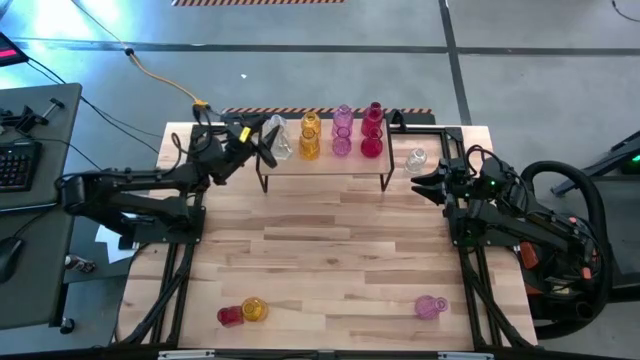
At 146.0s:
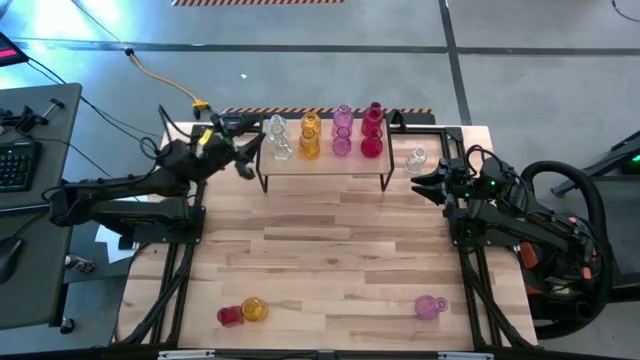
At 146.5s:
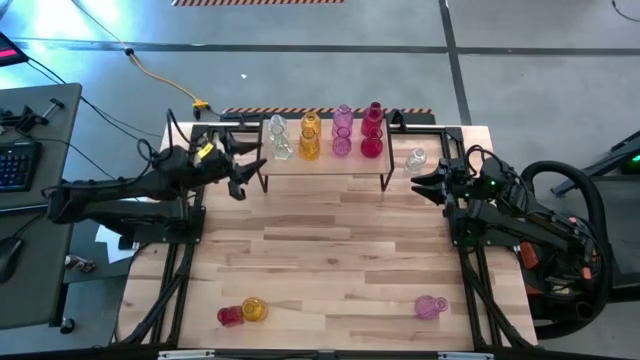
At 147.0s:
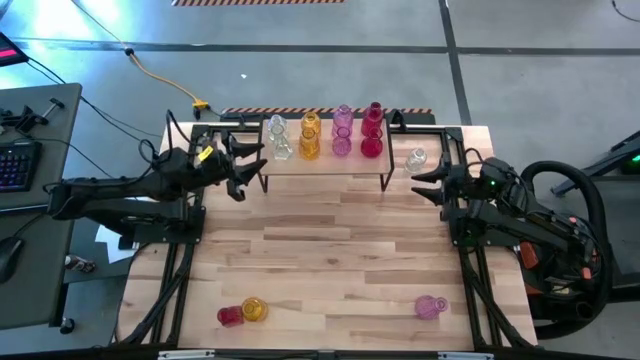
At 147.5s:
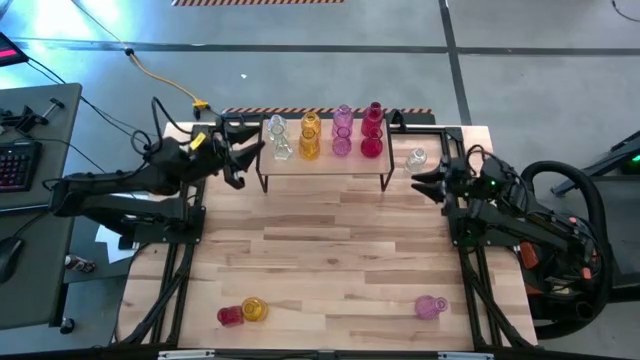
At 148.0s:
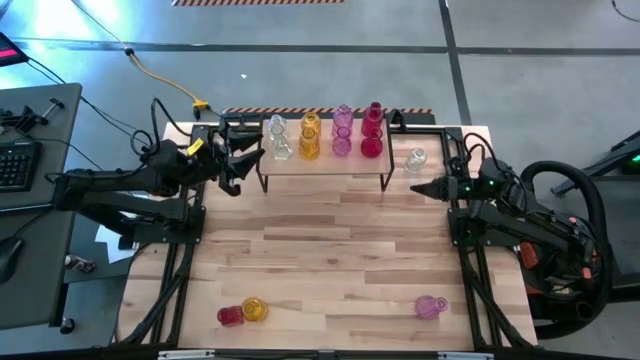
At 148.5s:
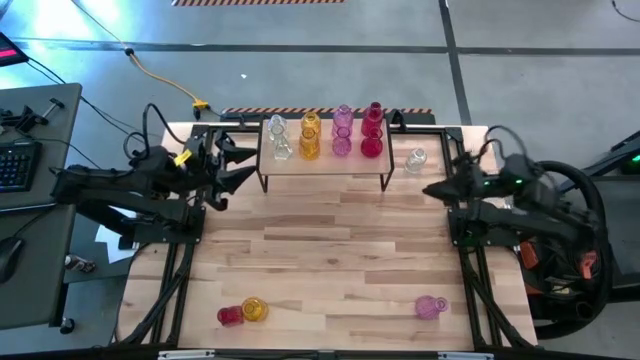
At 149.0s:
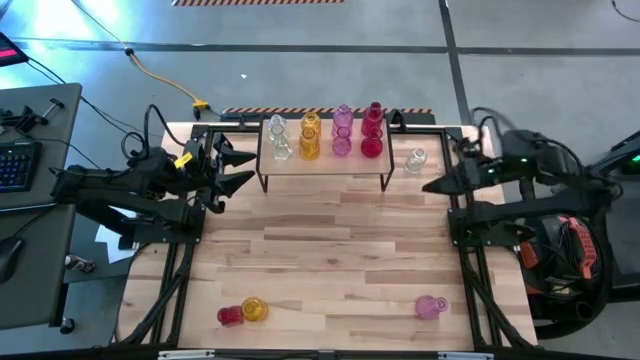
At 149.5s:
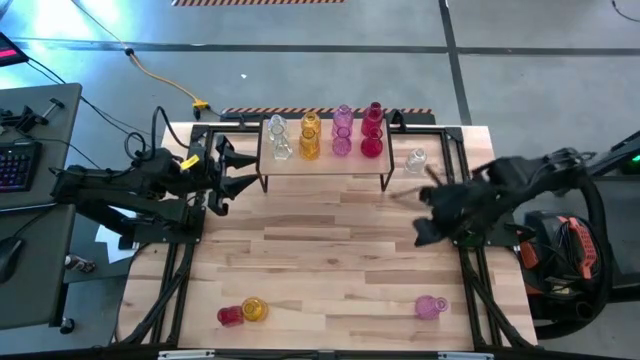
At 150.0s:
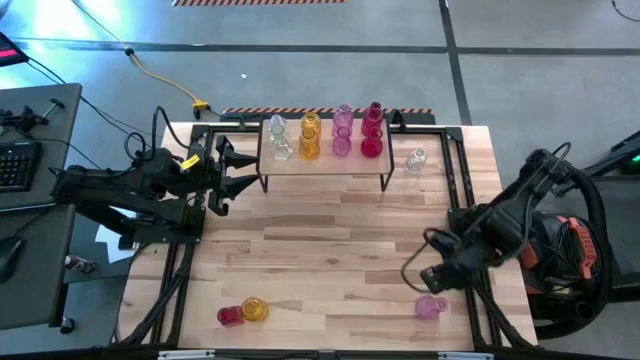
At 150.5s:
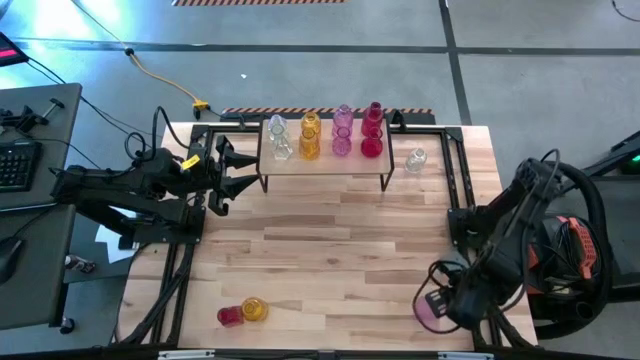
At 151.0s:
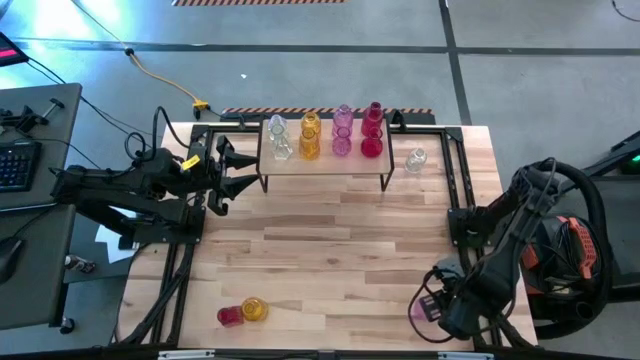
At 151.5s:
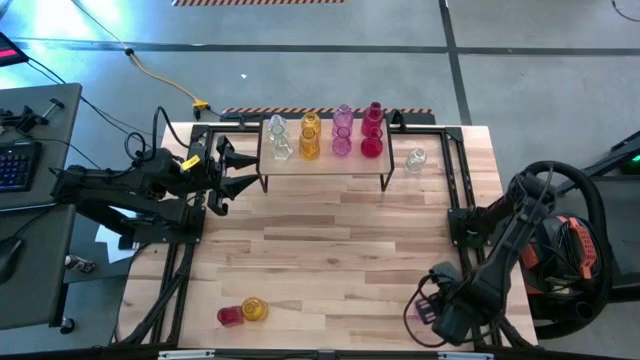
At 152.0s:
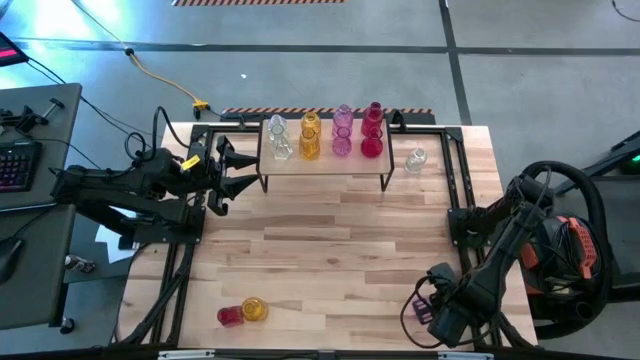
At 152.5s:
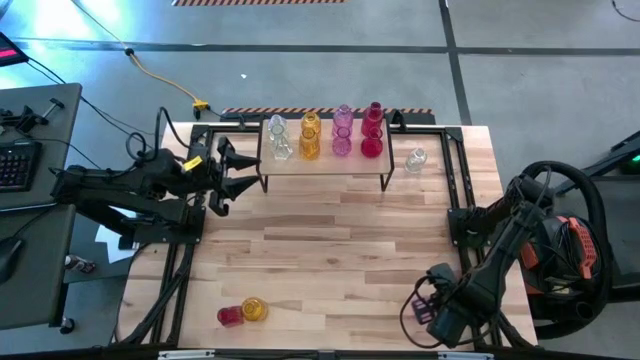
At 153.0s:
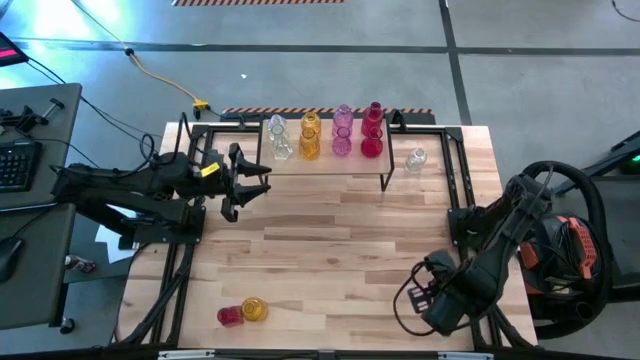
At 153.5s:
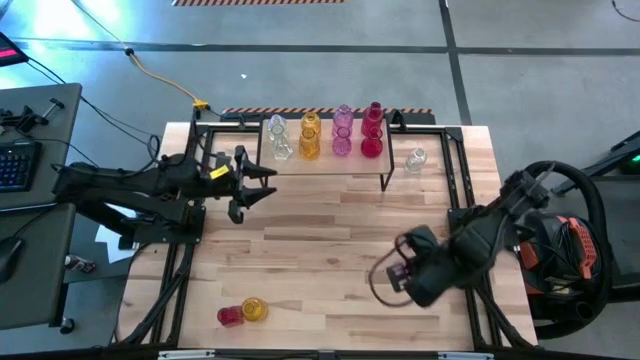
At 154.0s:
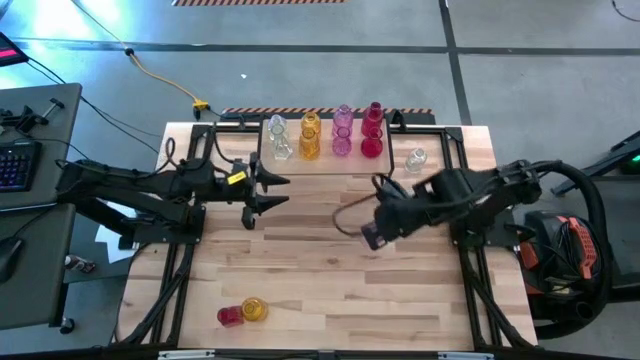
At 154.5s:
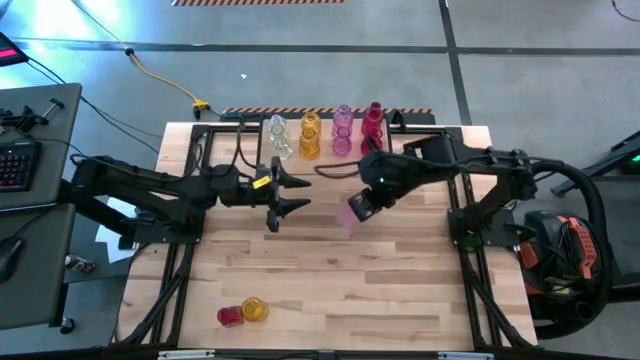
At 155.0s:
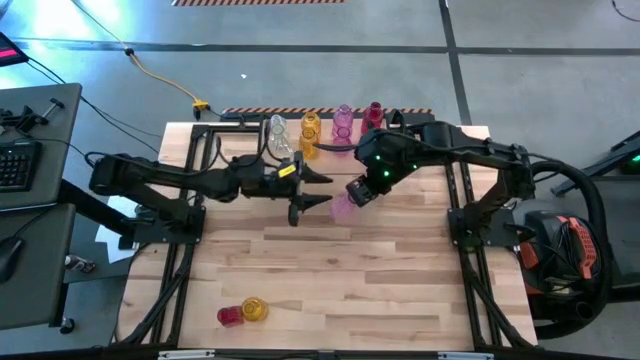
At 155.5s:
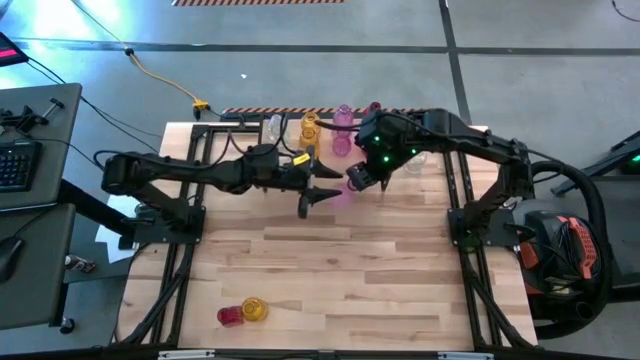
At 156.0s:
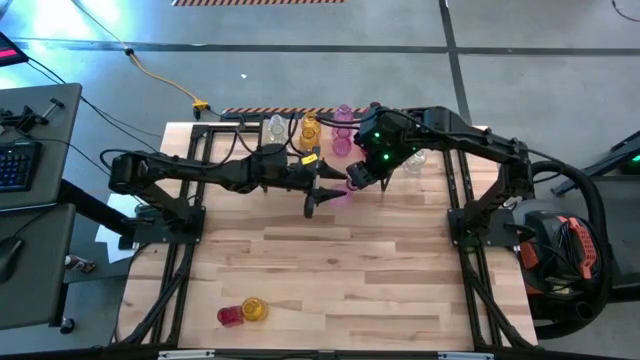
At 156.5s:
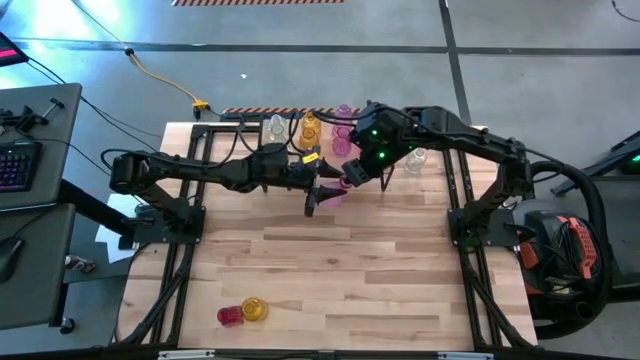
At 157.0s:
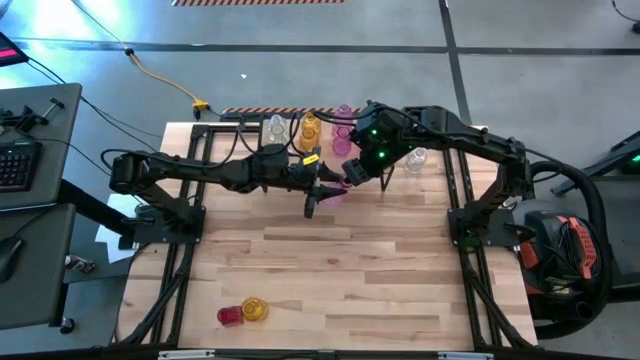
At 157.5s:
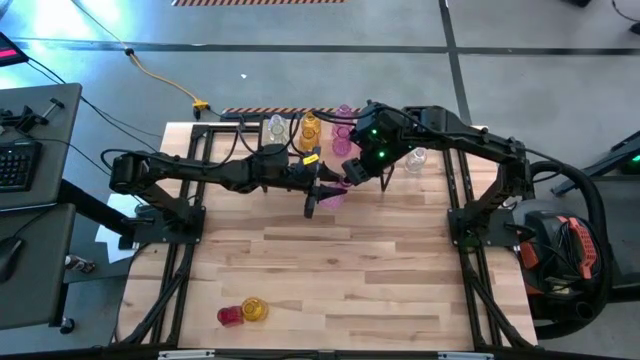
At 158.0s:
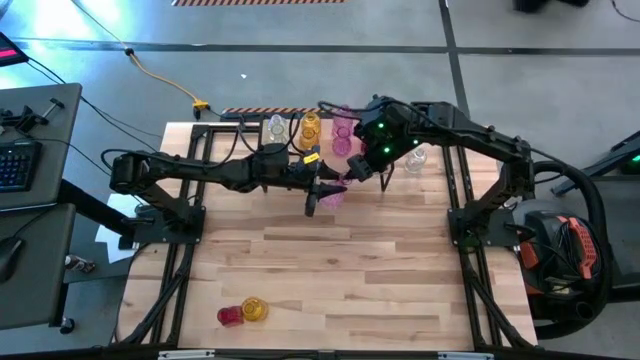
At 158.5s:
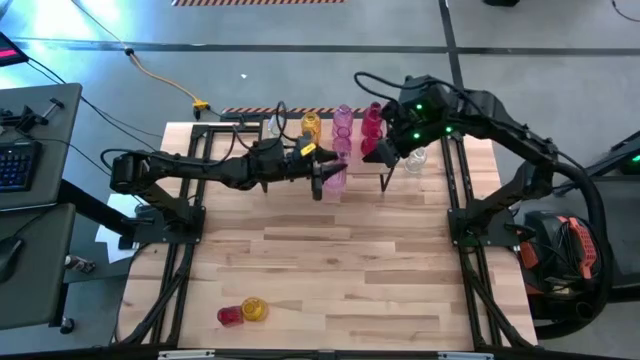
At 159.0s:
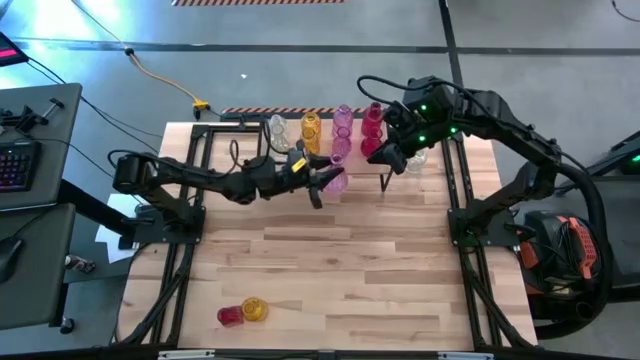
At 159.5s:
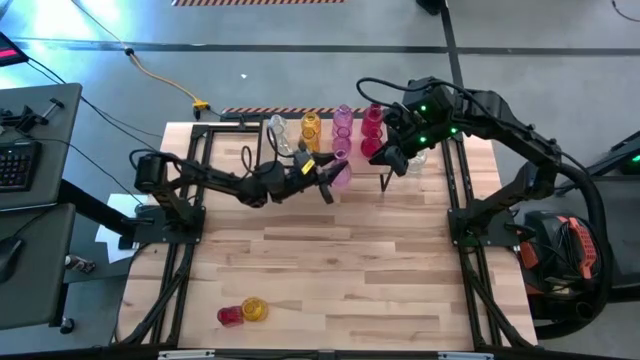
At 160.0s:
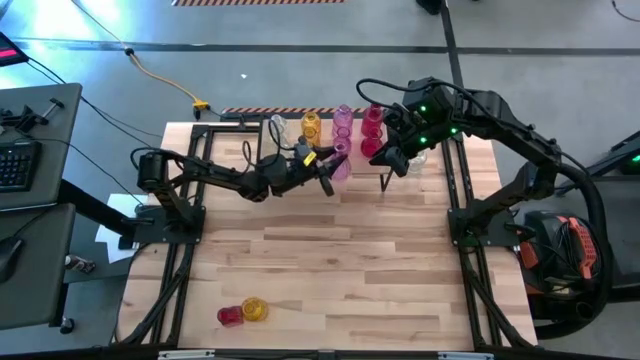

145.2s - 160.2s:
Task: sort vases onto shelf
Put the violet vase aligned with the other violet vases on the shelf

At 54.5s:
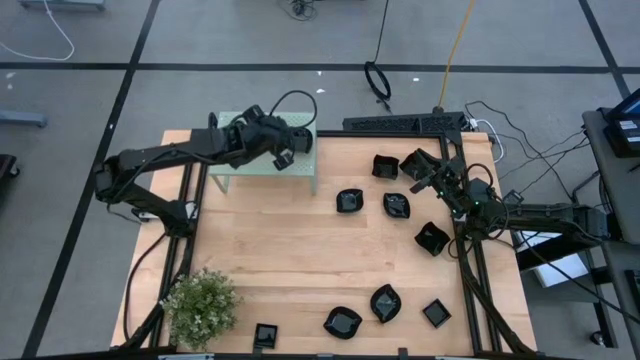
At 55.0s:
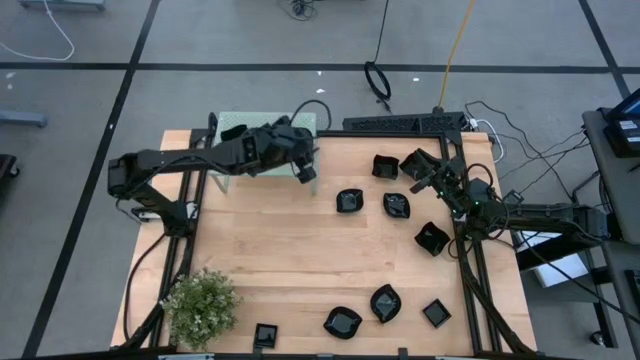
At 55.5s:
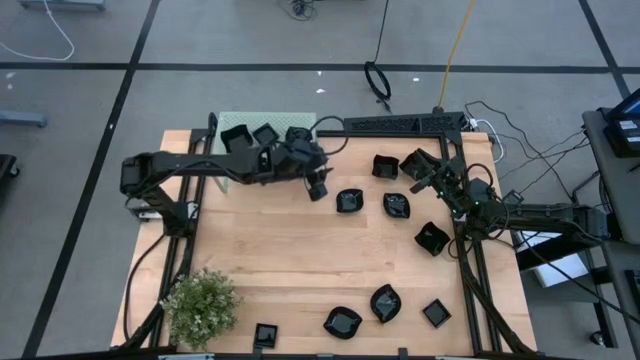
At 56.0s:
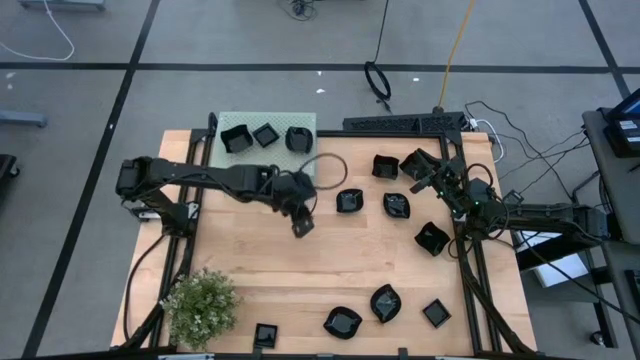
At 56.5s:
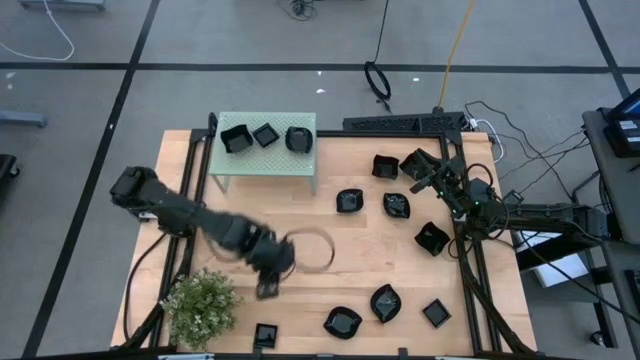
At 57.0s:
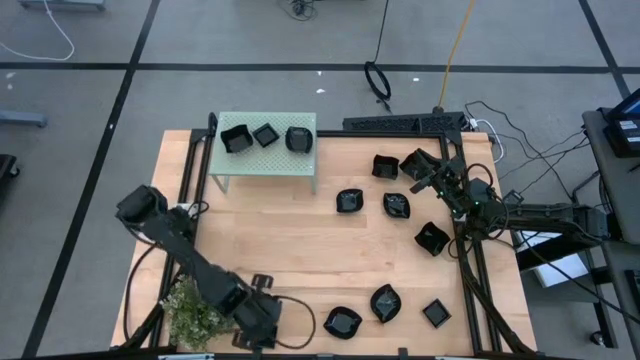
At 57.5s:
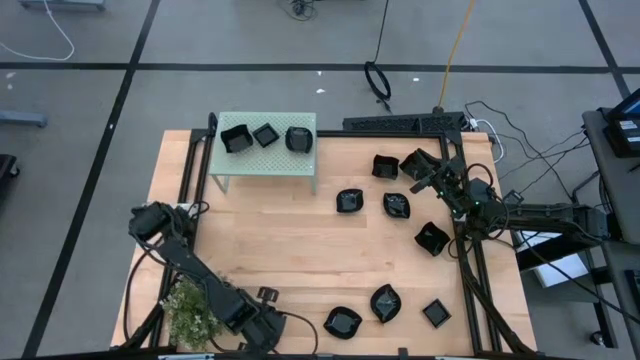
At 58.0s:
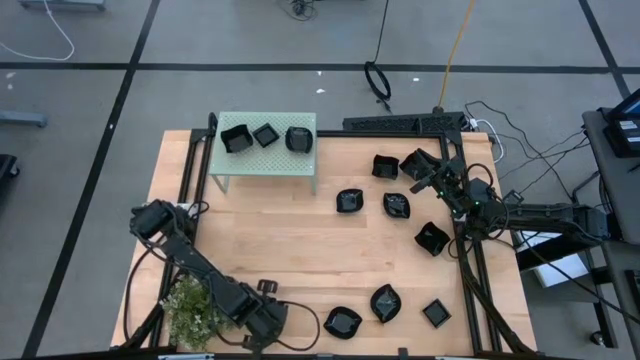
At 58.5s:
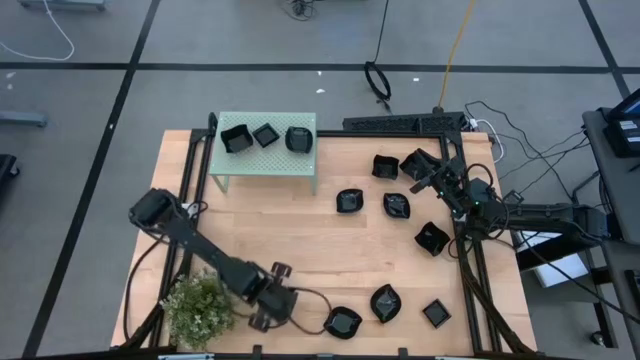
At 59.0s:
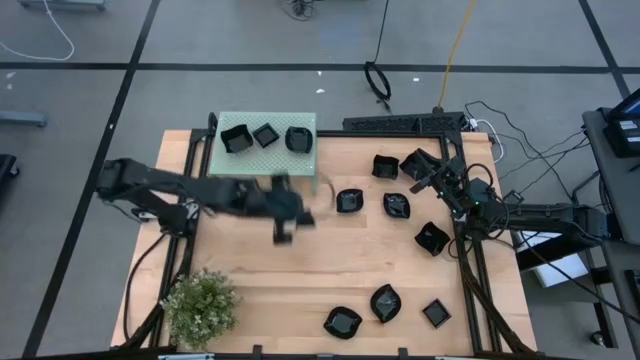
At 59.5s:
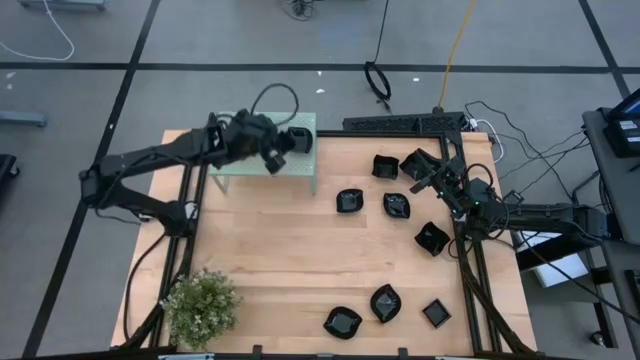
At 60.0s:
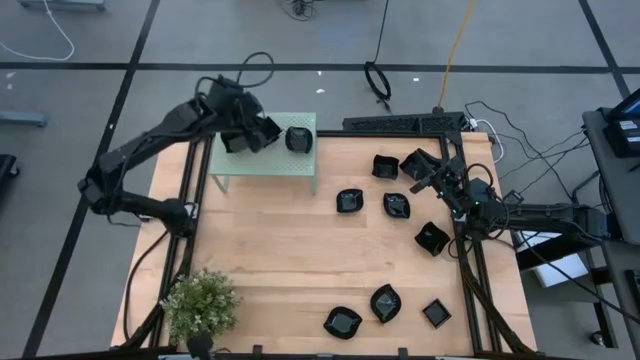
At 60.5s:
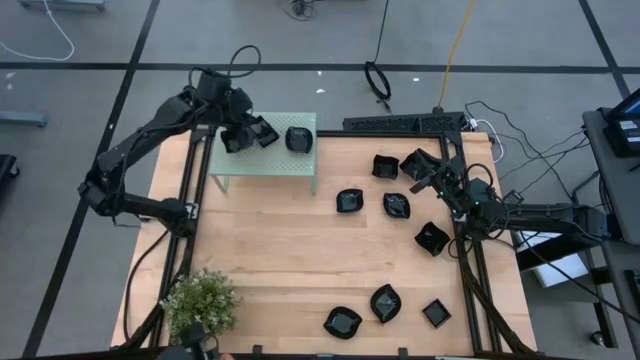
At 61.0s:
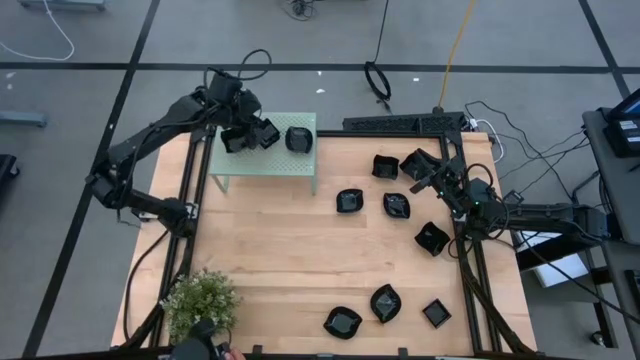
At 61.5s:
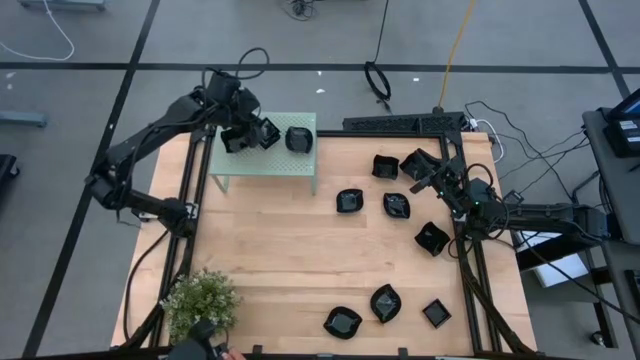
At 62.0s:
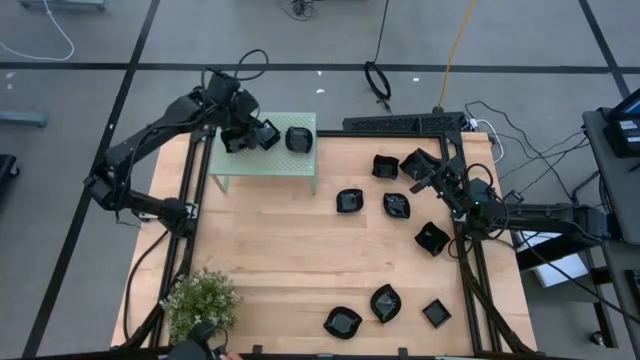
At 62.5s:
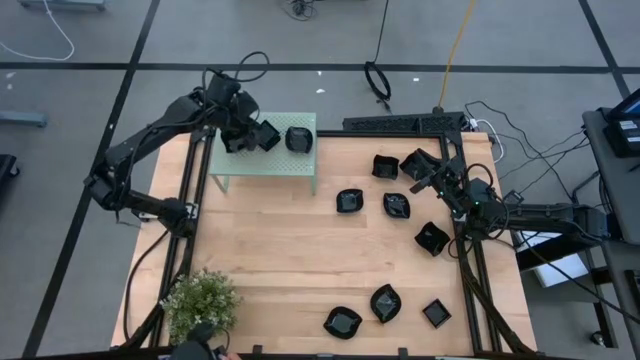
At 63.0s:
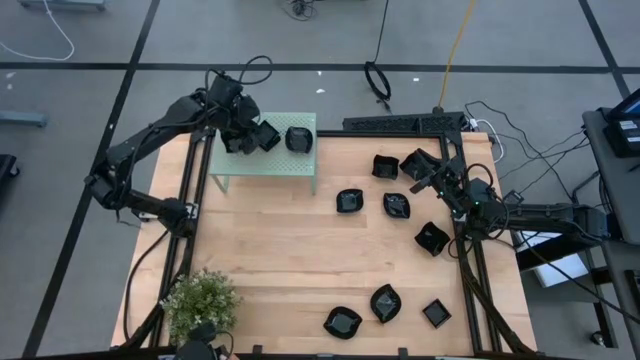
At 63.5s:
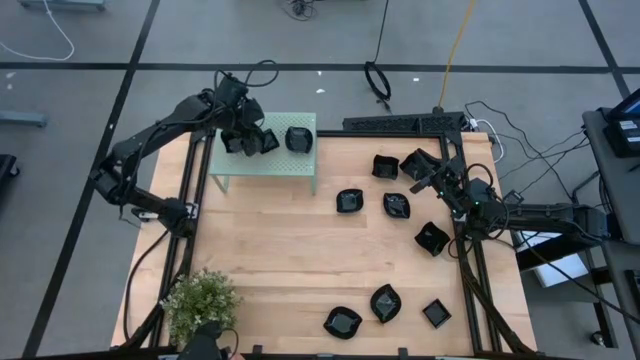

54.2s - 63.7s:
Task: Pick & Place Mini shaped plates
Stack the left square plate on top of the square plate on the shelf
